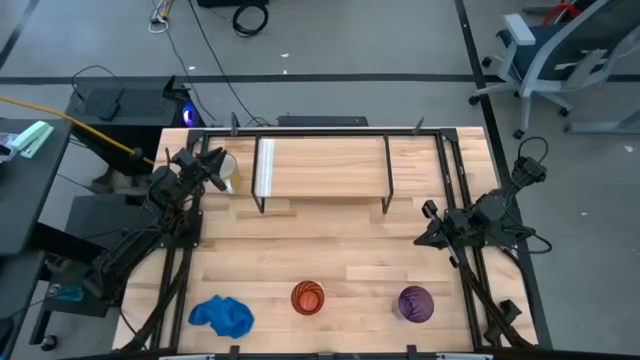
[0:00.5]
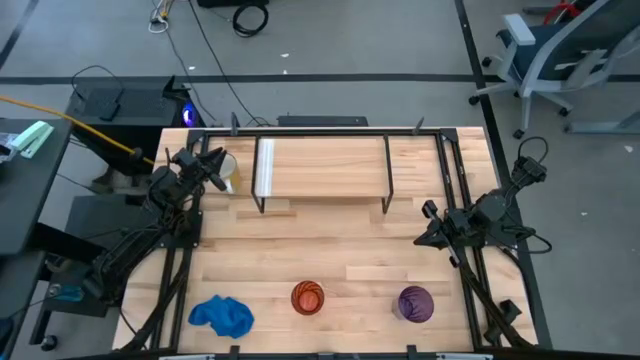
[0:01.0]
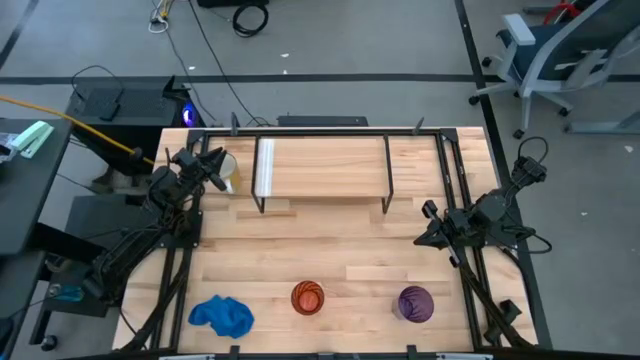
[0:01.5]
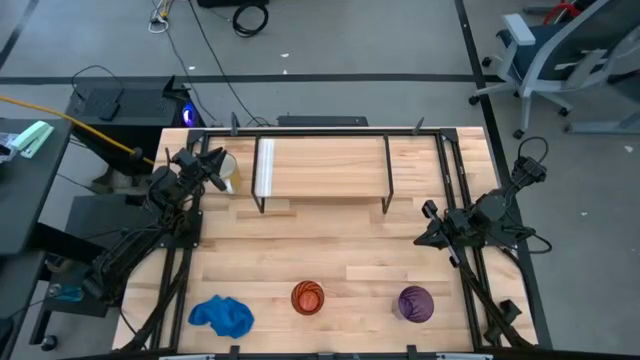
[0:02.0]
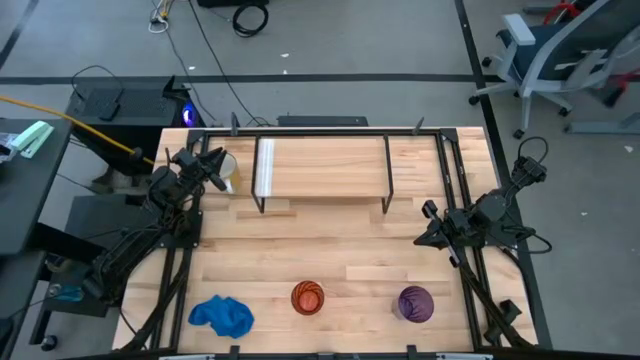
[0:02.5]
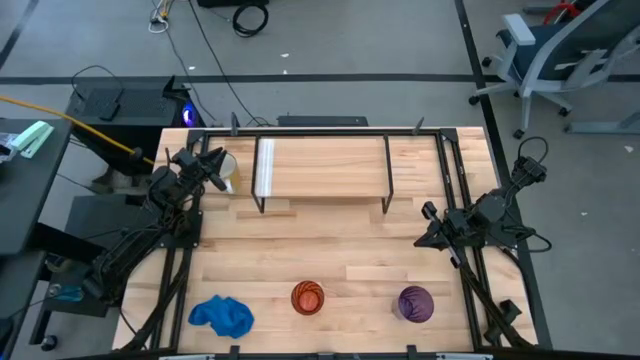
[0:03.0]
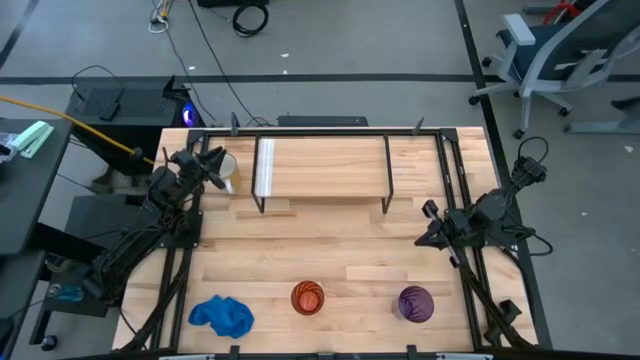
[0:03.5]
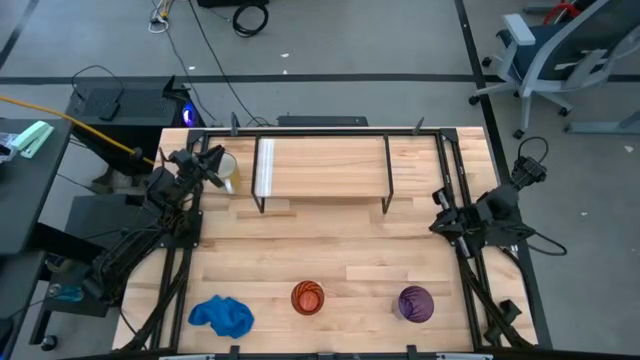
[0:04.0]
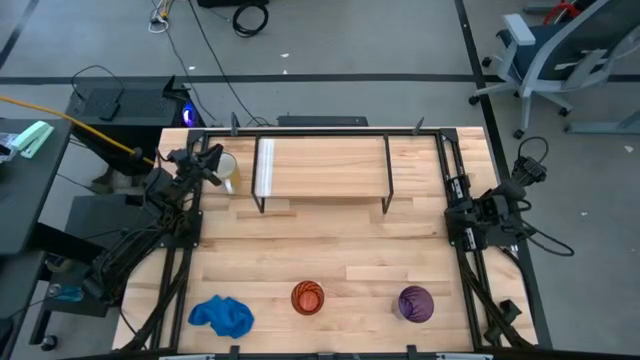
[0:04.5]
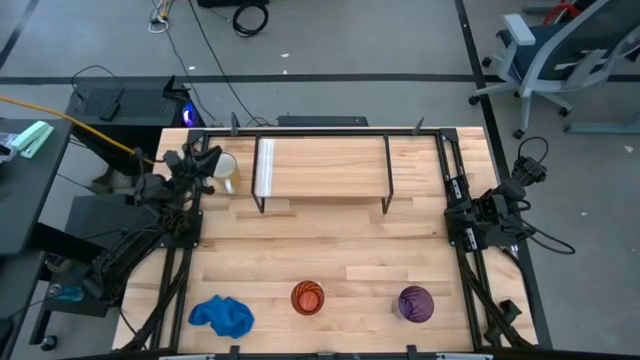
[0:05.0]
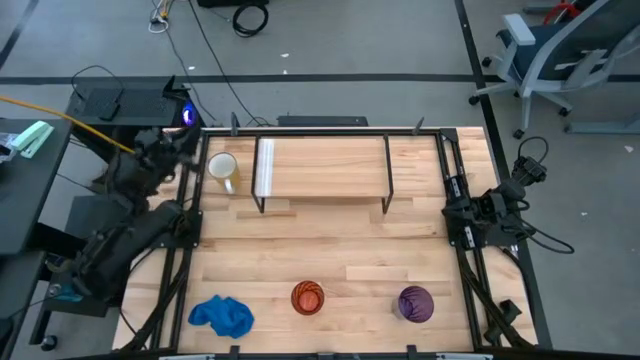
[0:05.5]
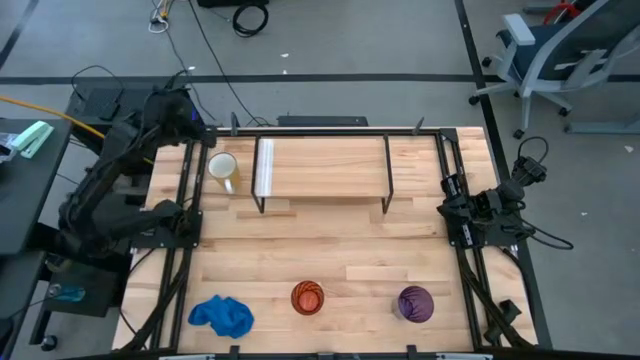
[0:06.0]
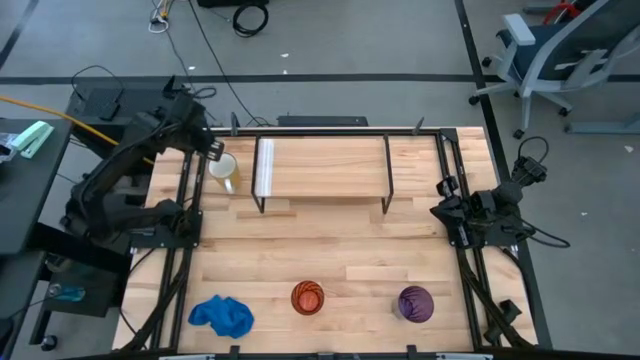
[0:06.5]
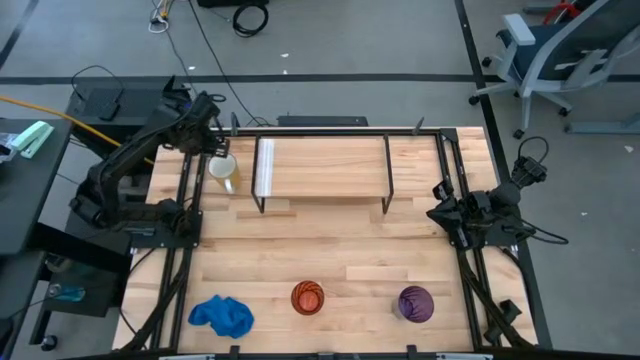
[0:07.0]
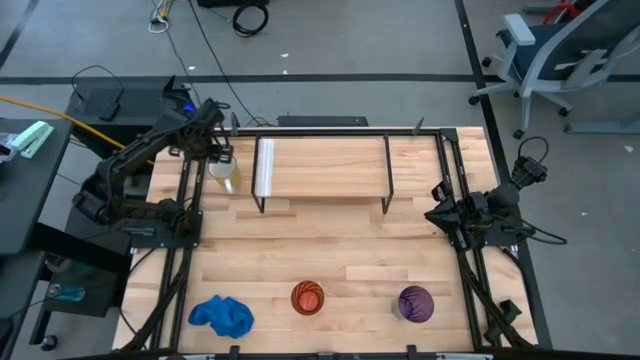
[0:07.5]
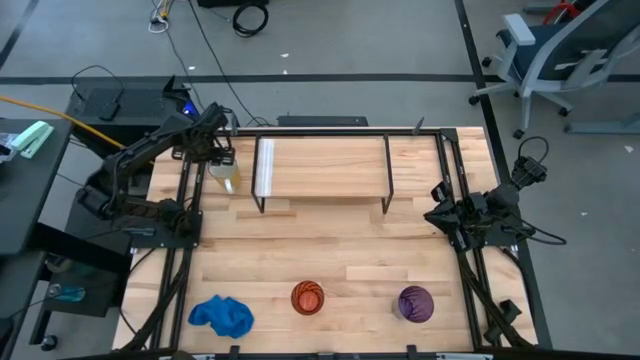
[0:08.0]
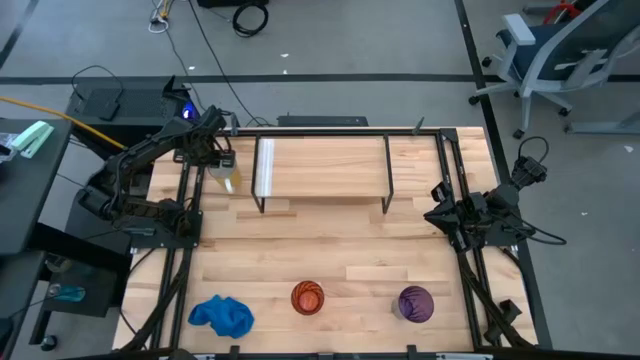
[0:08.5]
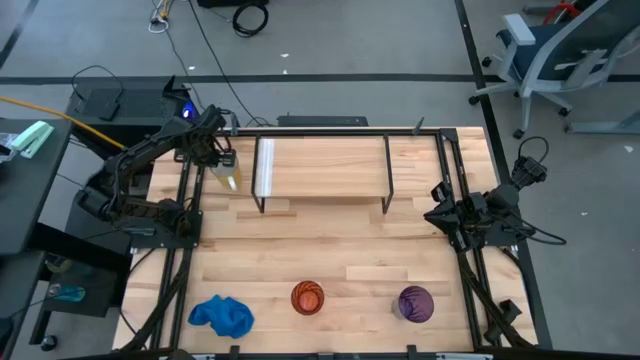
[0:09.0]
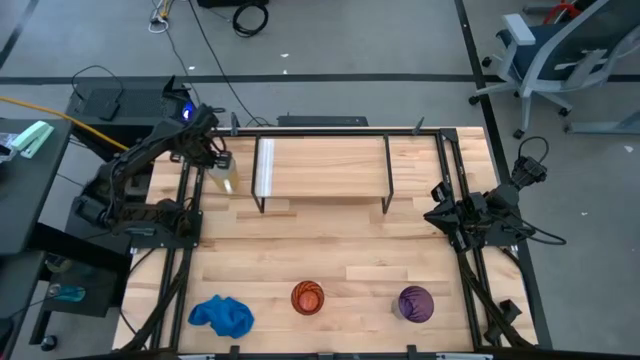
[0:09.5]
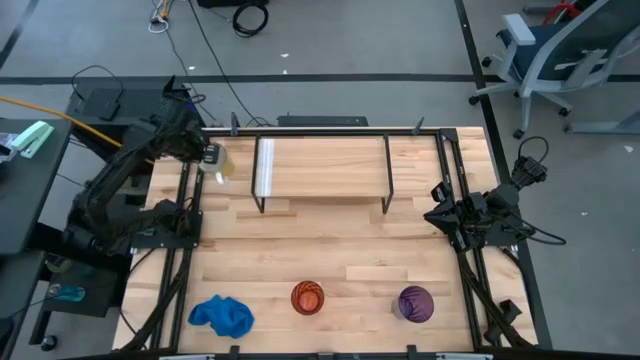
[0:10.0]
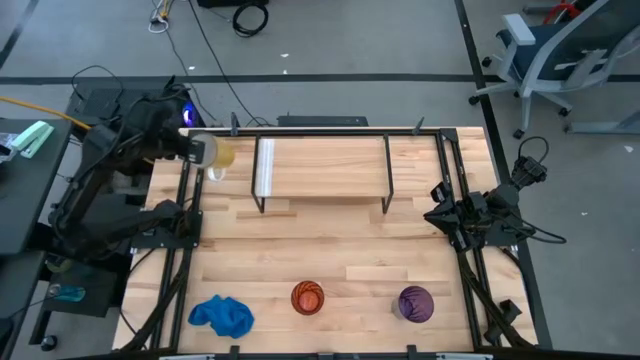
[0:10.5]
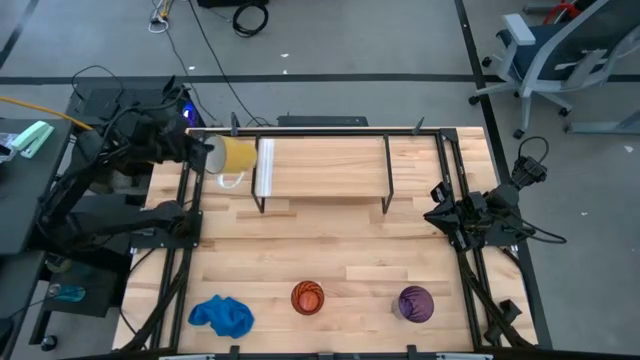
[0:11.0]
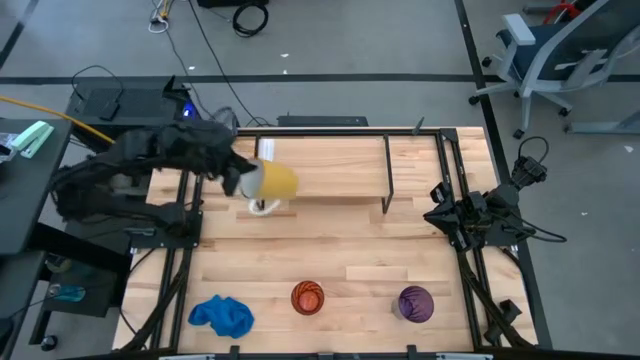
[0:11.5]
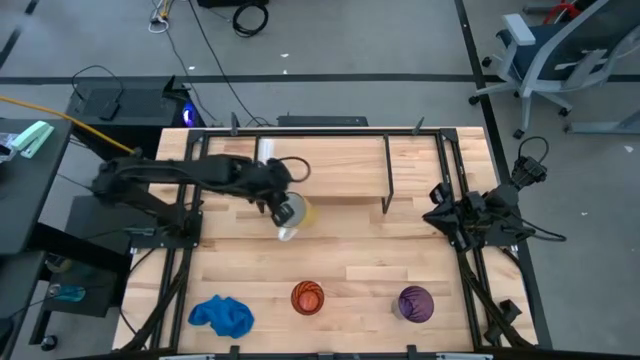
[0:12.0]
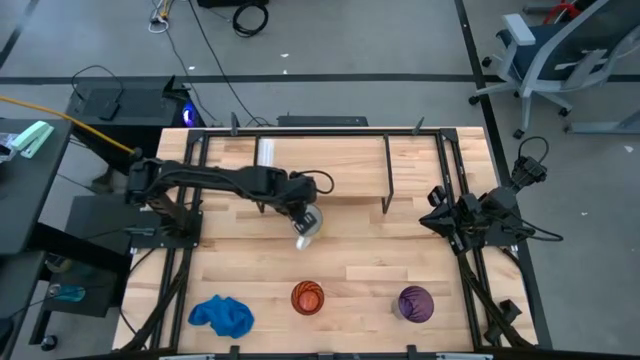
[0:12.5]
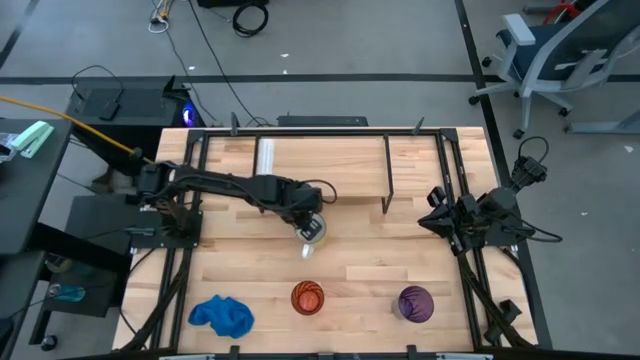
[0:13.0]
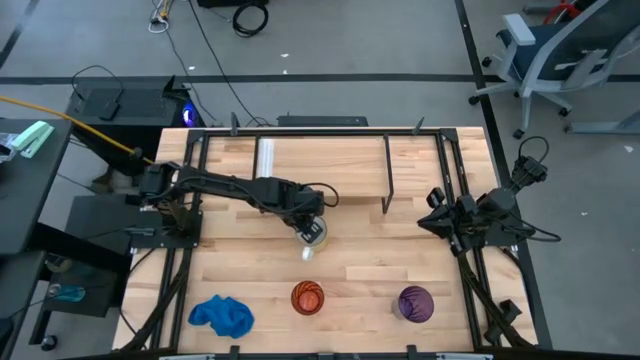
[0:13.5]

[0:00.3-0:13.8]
Task: Stack small to large cups/mugs on shelf
Move the yellow mug to the center of the table

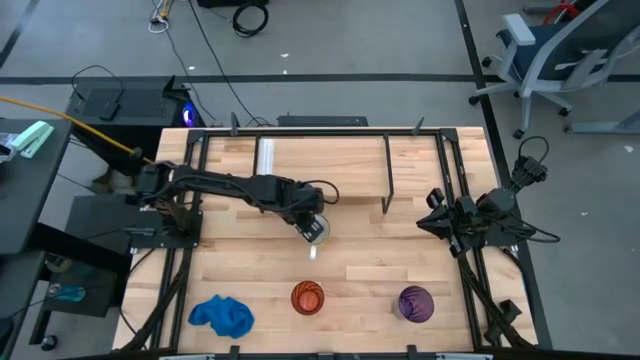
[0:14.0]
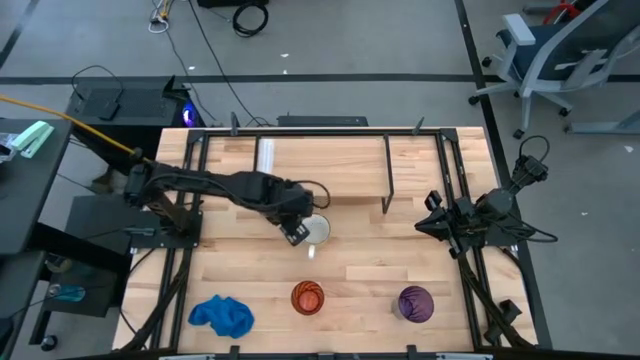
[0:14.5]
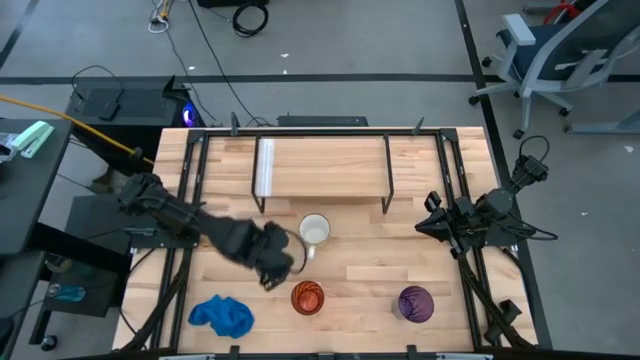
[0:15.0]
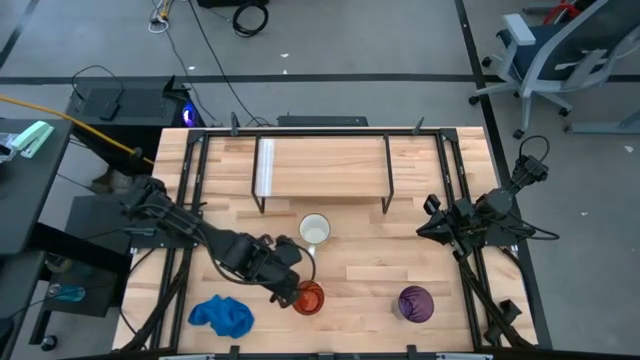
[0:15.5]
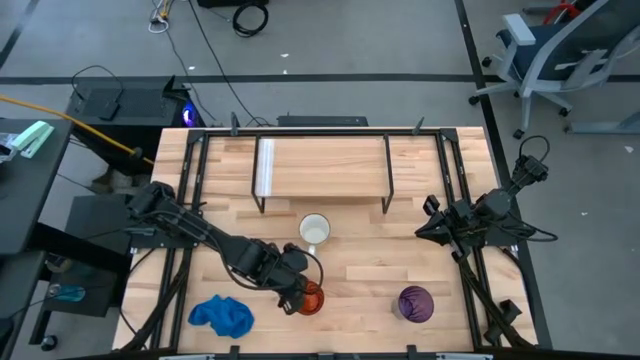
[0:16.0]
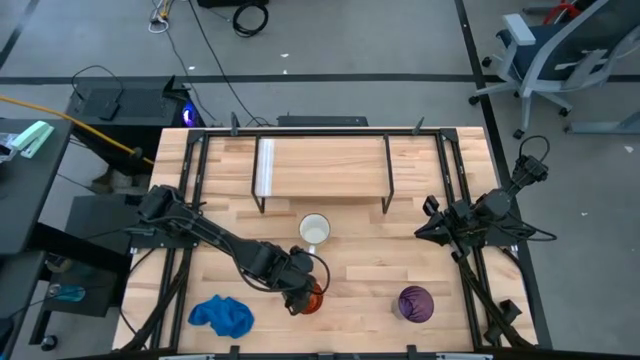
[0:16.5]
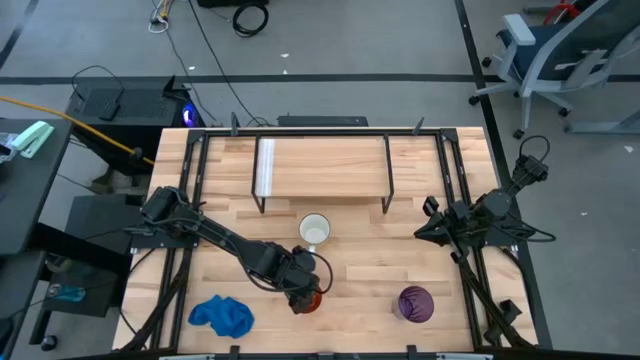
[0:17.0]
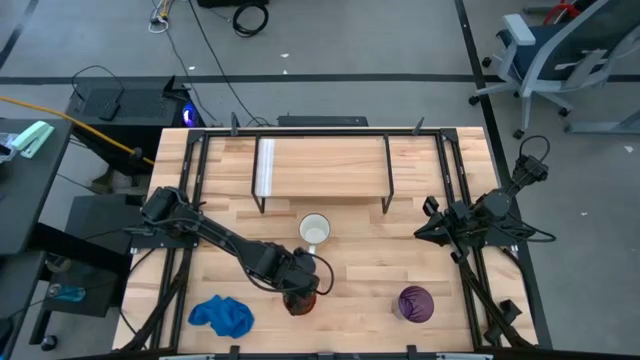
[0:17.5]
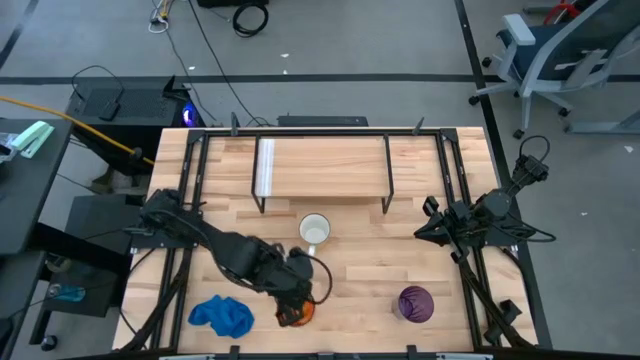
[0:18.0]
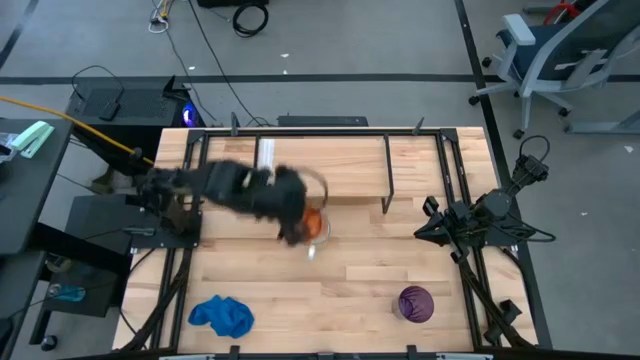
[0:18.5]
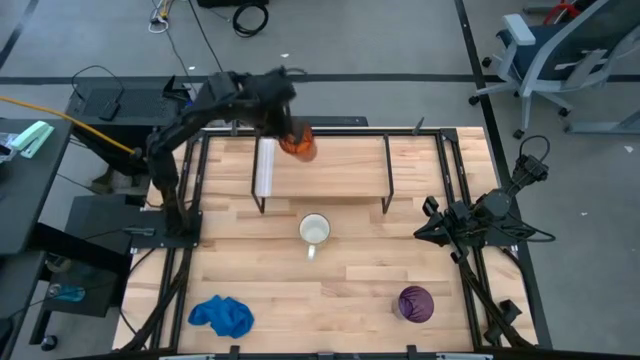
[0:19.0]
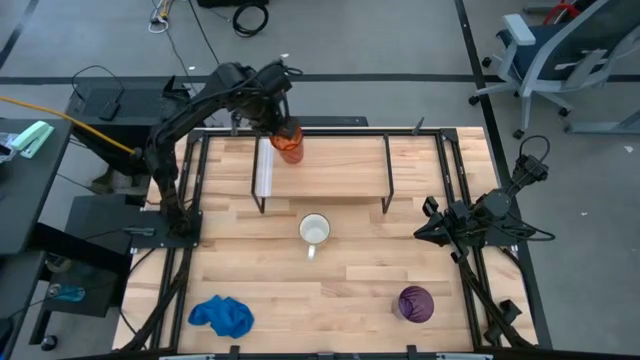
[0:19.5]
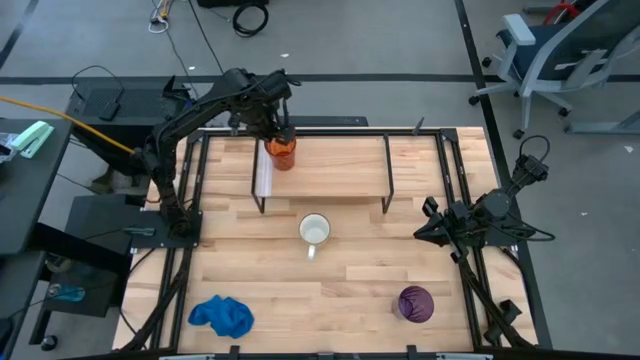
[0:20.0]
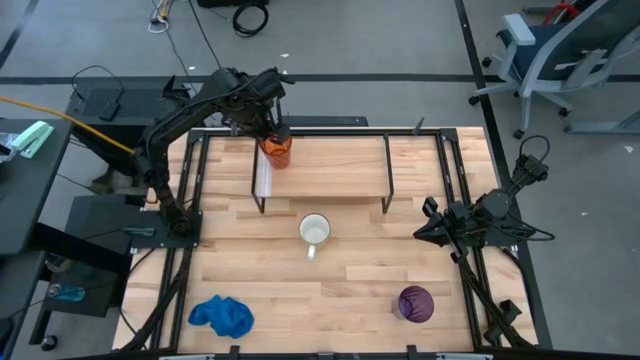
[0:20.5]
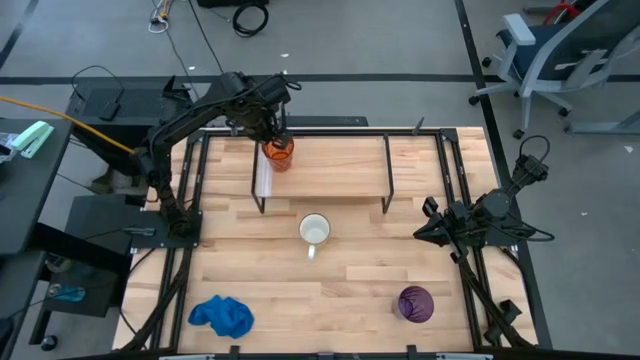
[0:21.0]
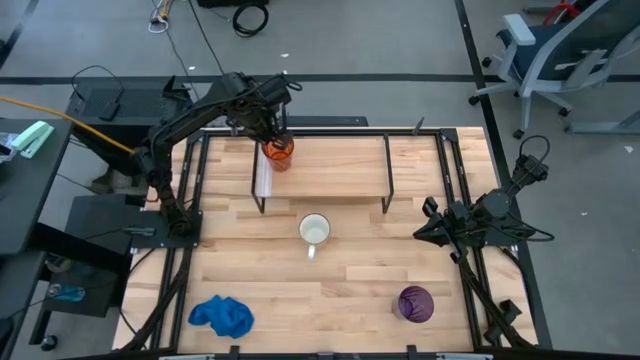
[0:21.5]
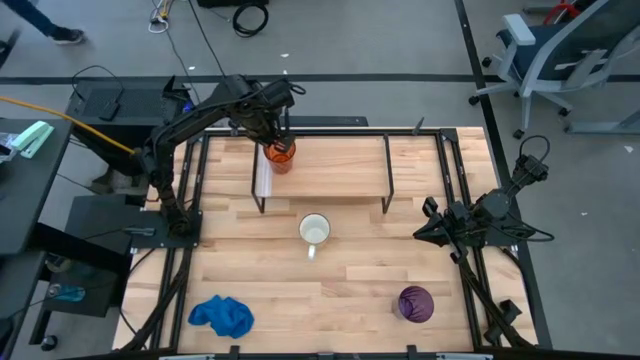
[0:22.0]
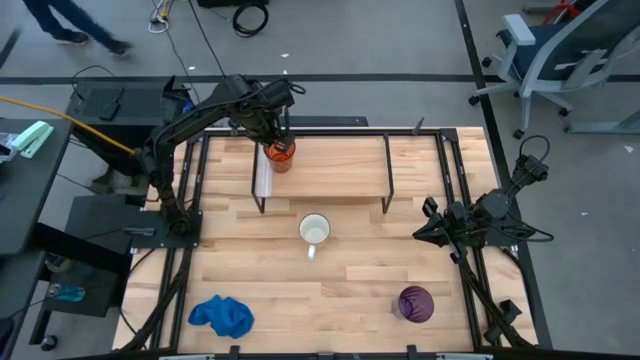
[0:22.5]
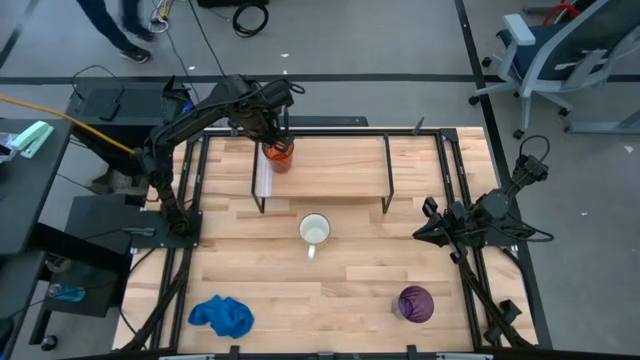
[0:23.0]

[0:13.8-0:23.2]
Put the brown cup on the shelf
